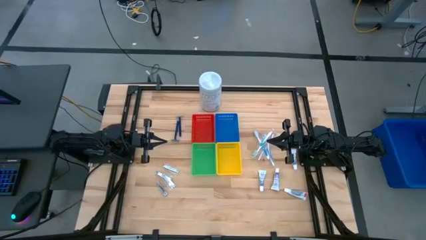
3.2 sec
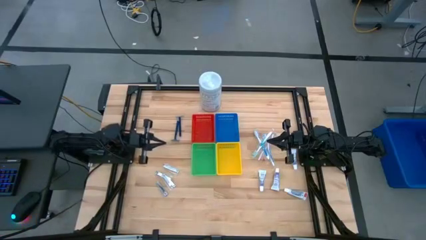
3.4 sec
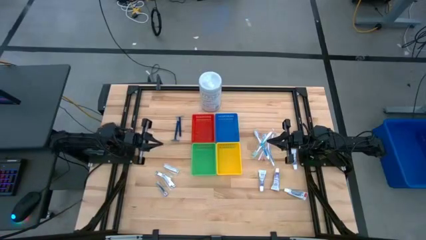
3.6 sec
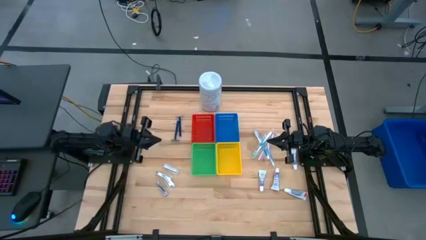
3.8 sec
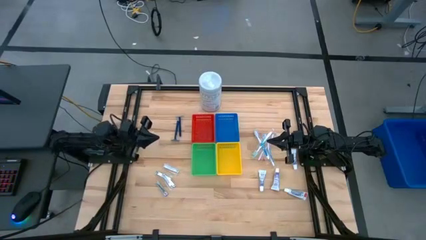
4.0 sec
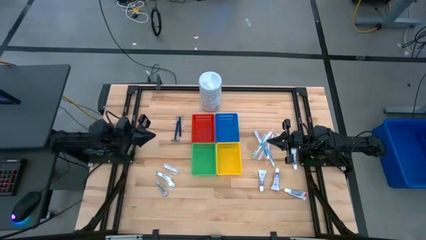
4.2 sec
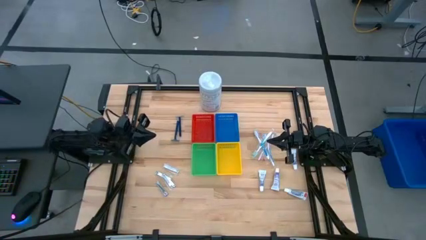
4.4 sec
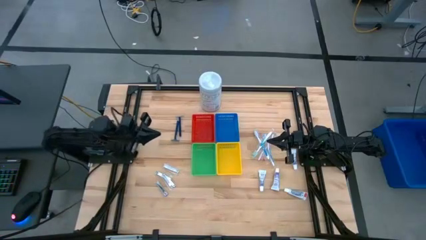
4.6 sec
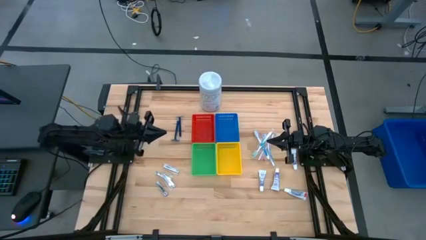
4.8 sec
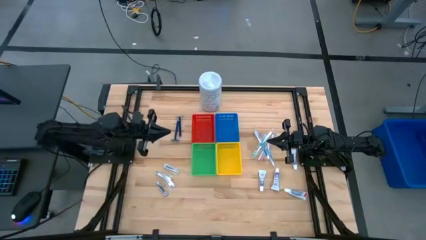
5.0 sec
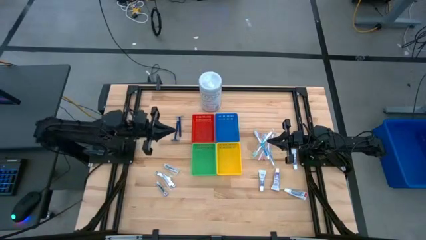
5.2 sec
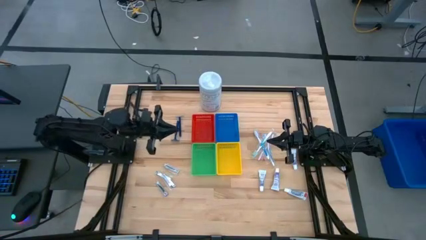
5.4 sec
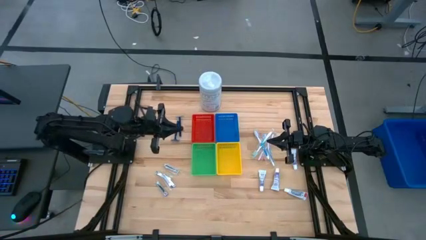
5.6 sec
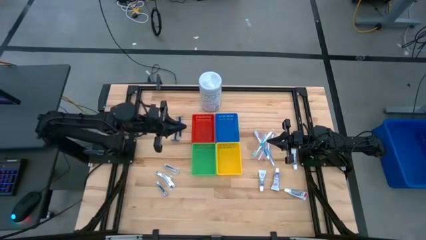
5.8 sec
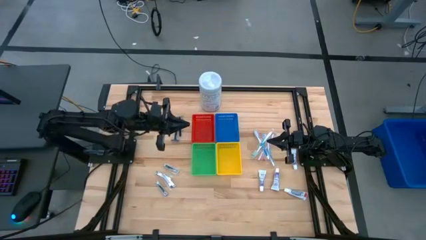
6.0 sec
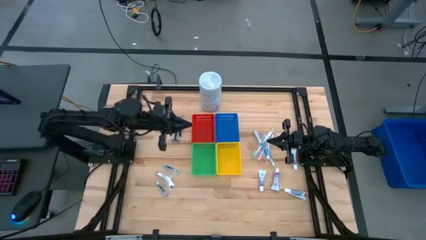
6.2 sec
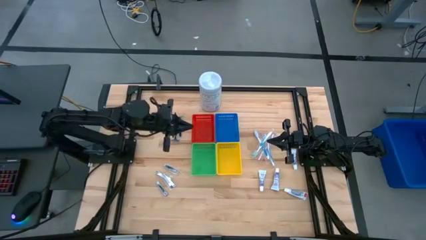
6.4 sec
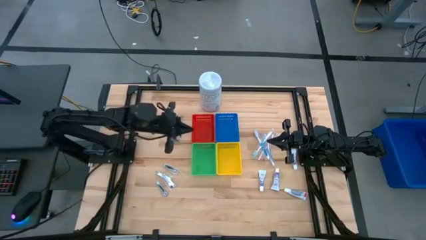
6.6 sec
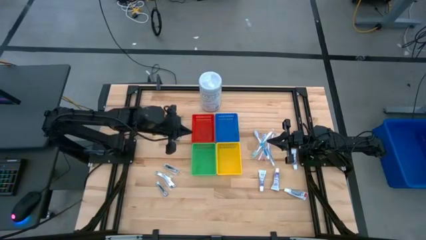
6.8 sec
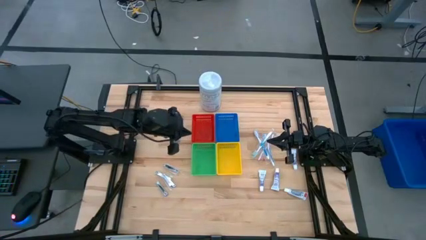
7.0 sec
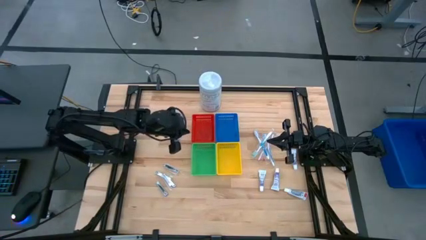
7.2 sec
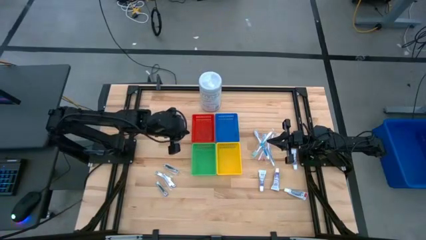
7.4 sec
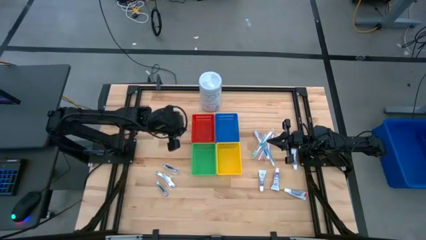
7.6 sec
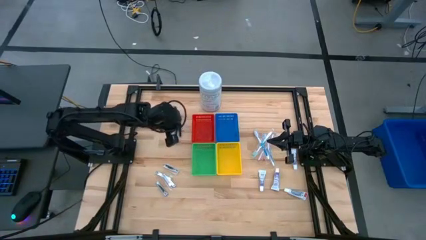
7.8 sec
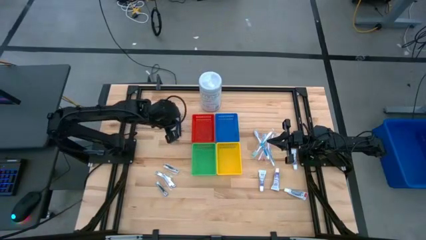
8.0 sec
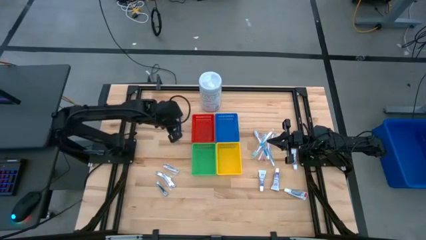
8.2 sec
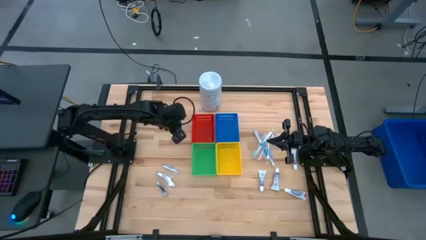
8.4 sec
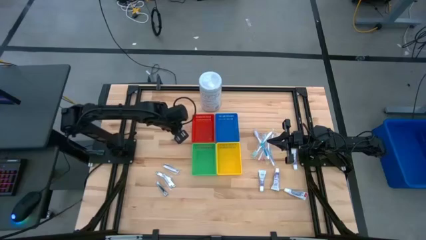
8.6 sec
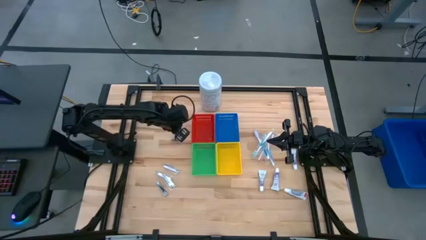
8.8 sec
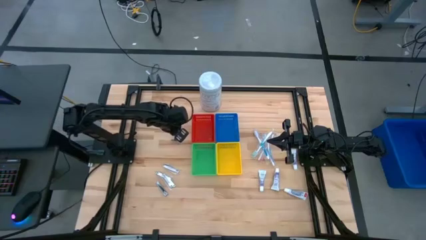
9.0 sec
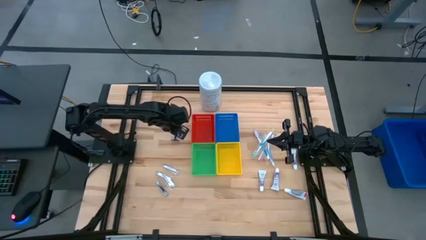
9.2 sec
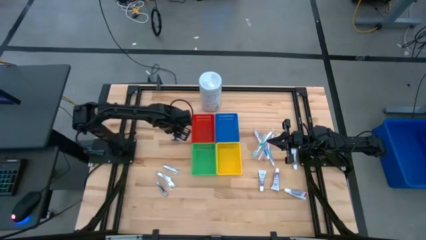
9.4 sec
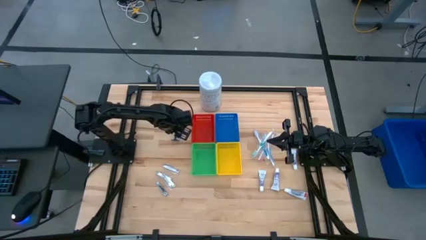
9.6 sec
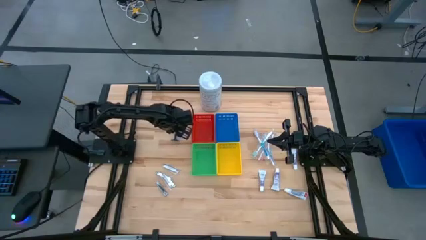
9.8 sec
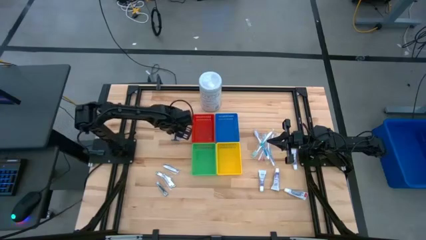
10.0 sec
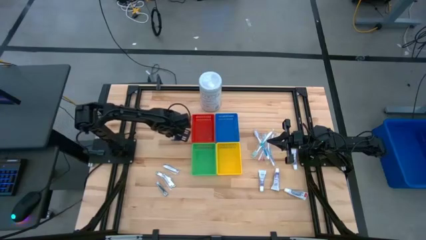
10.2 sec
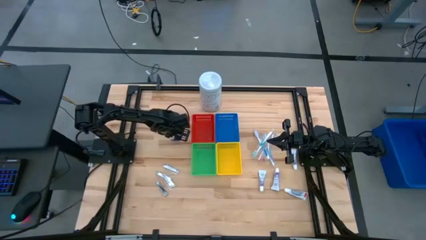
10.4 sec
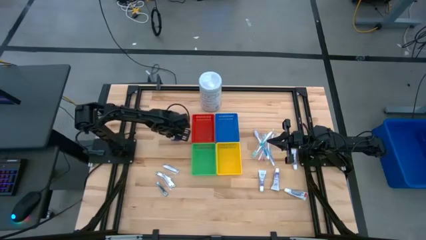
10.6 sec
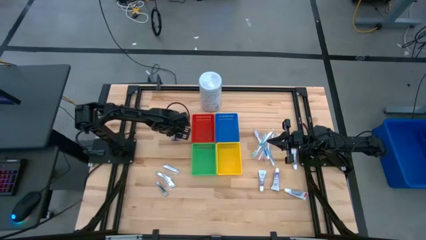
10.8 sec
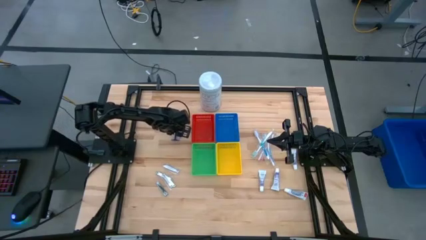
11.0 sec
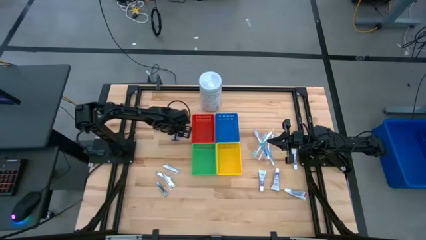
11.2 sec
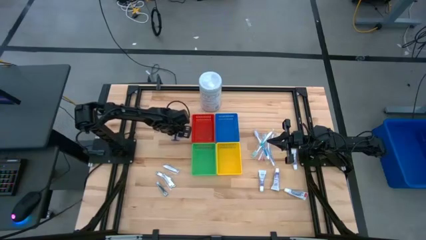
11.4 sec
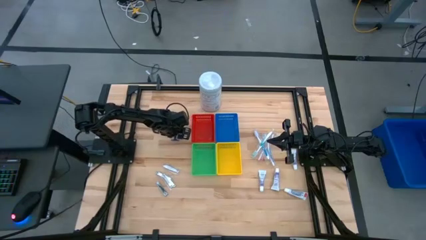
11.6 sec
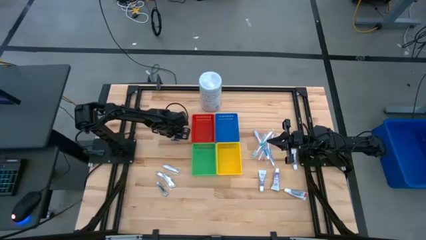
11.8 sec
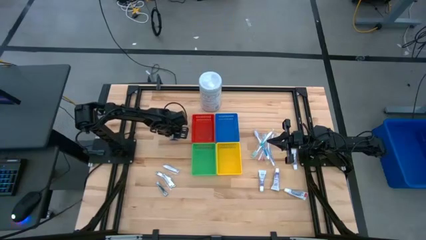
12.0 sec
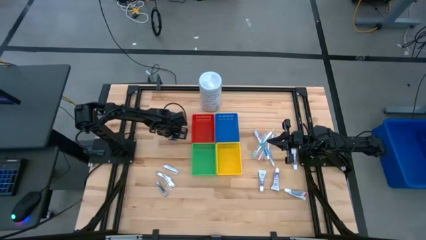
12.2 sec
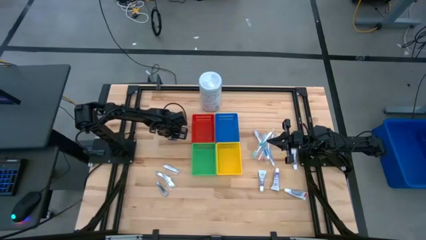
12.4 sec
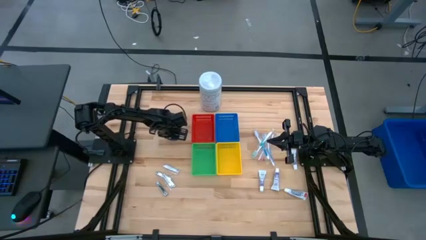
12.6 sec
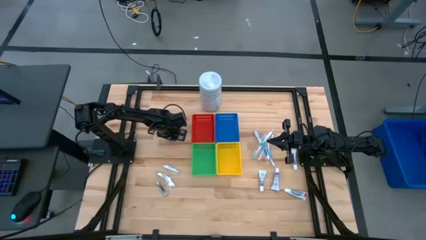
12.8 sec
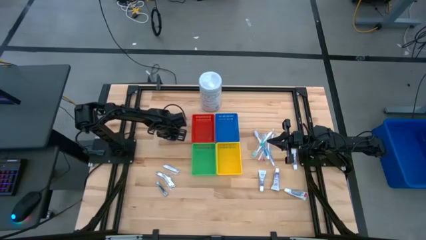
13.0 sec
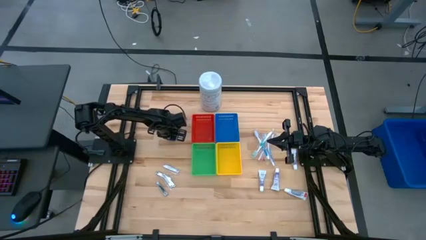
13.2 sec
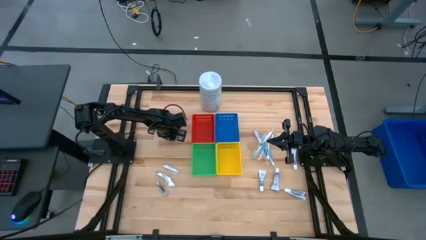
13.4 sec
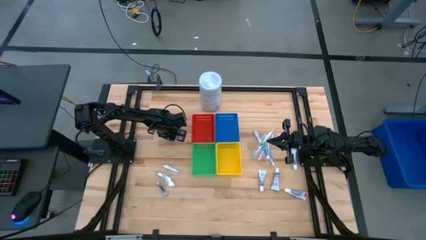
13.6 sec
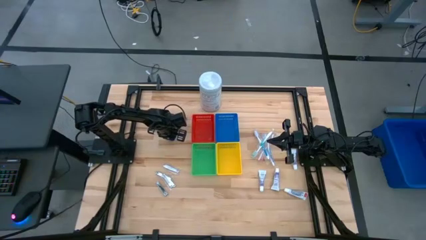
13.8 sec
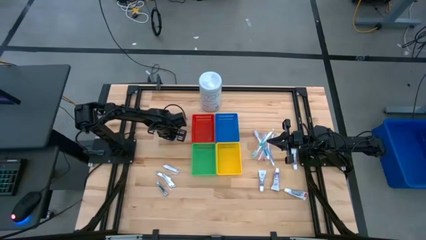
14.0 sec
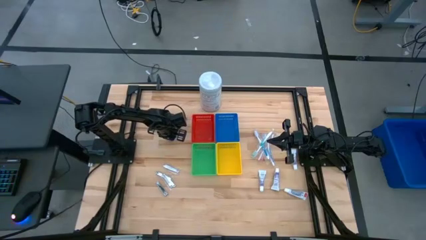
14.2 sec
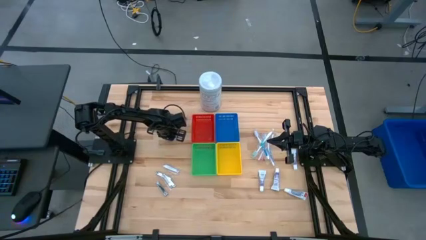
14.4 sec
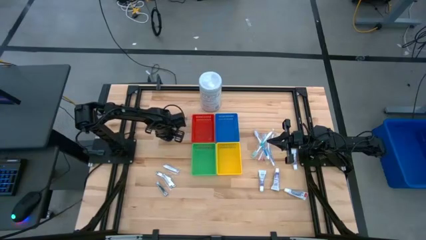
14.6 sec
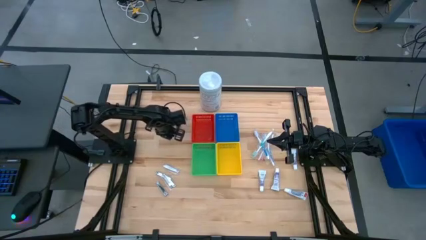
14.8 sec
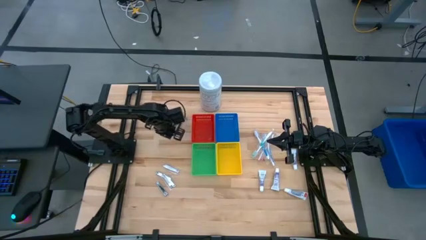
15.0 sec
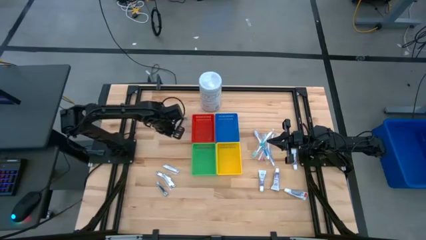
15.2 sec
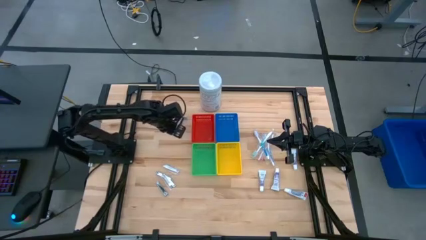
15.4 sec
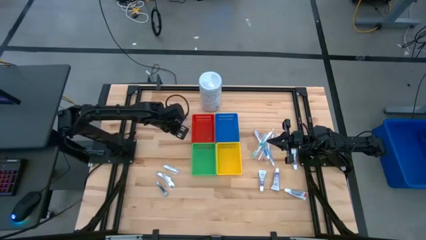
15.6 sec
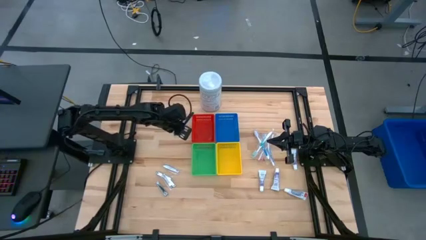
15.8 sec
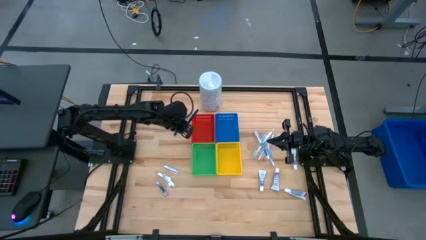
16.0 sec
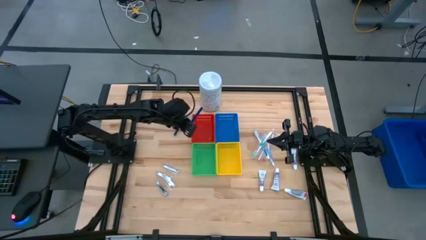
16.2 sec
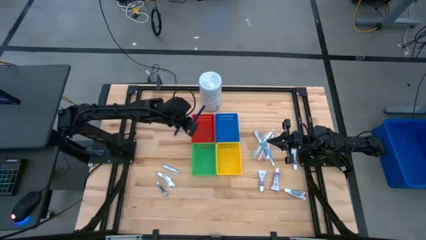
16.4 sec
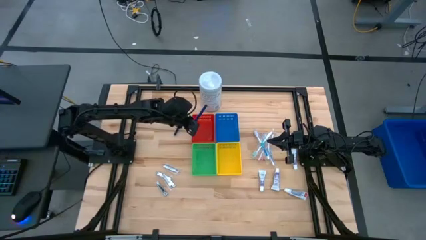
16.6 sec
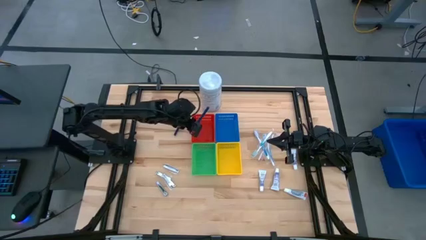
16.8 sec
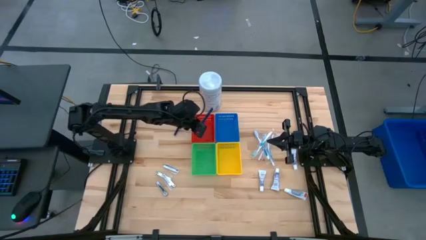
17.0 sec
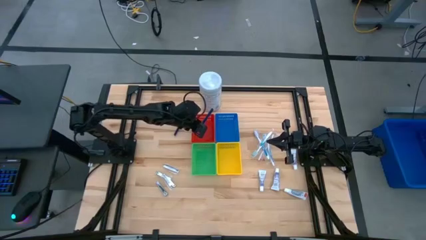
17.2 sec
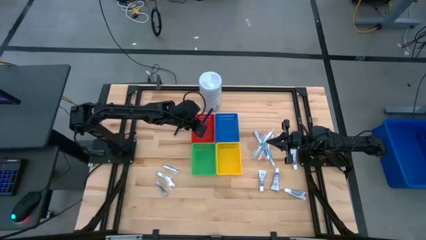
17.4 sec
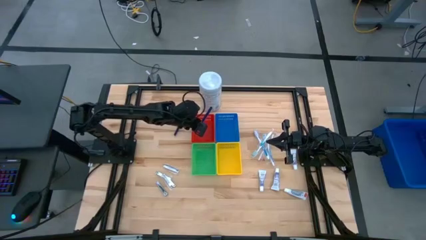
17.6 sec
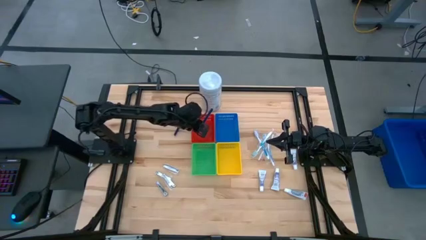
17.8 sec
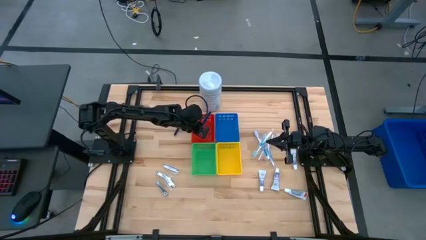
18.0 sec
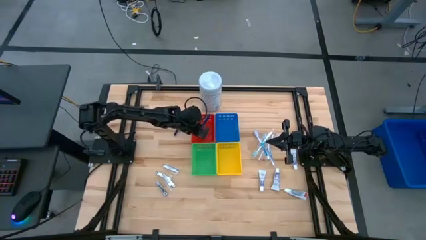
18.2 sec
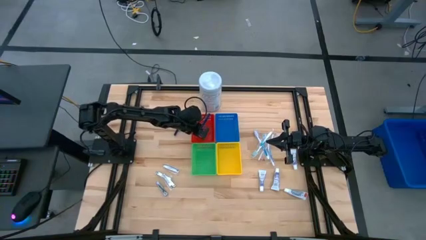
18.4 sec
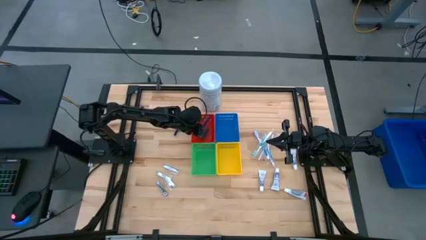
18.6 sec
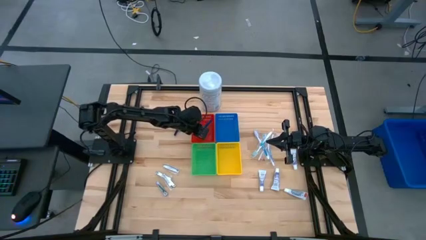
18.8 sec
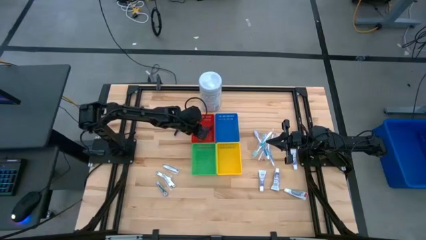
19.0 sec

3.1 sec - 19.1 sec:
Task: Pick & Place Travel size toiletries
Put the left blue razor into the red bin
